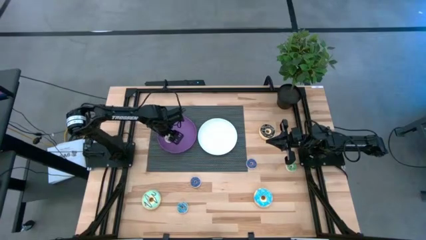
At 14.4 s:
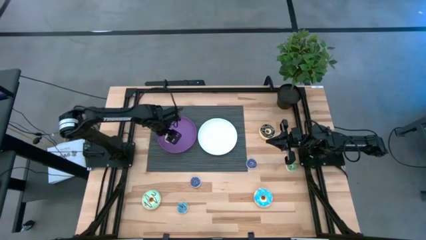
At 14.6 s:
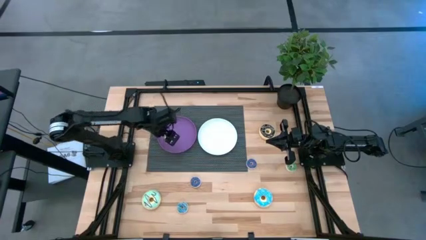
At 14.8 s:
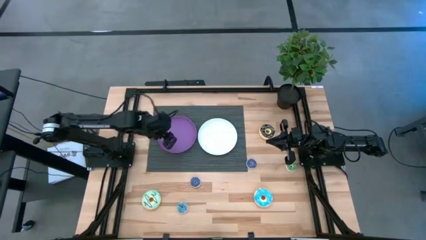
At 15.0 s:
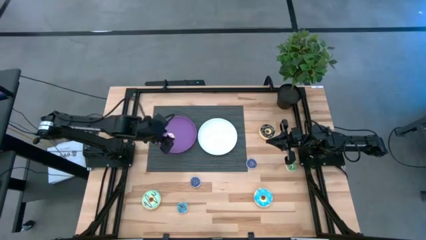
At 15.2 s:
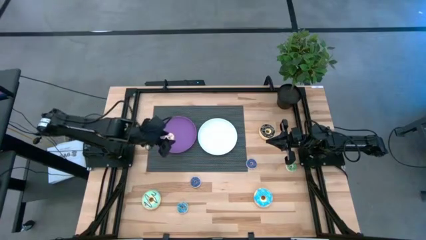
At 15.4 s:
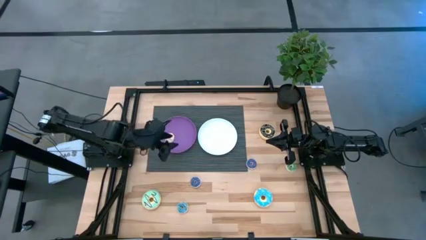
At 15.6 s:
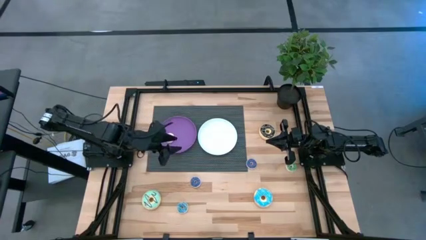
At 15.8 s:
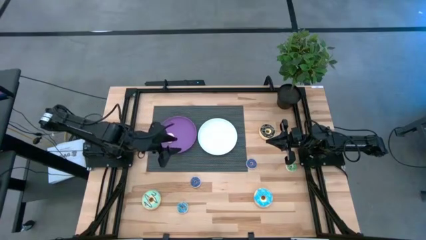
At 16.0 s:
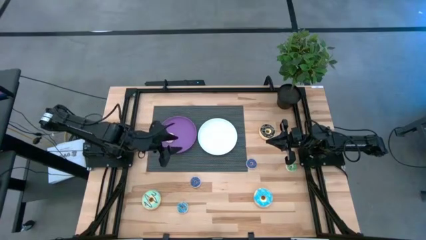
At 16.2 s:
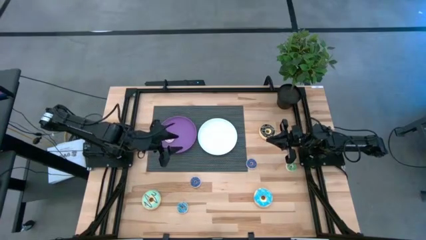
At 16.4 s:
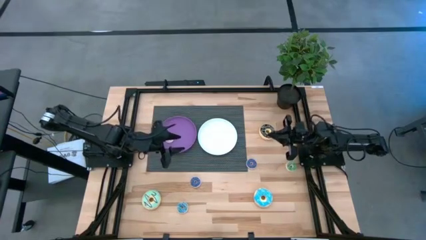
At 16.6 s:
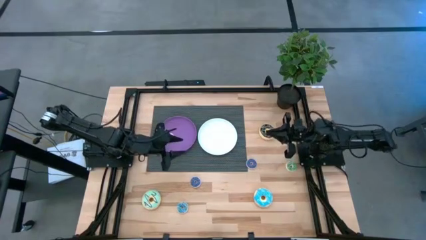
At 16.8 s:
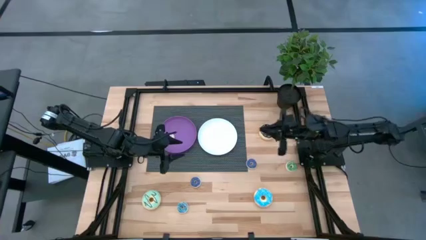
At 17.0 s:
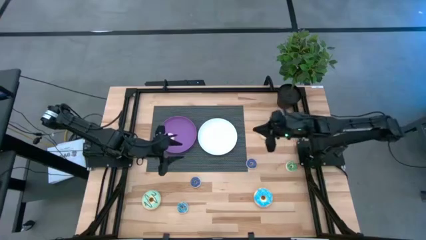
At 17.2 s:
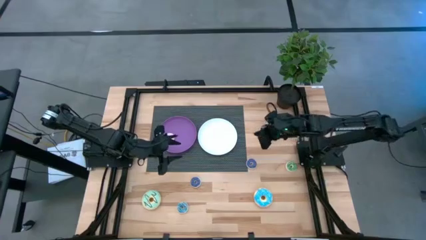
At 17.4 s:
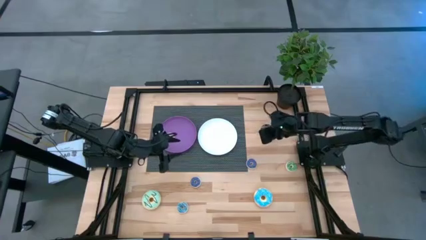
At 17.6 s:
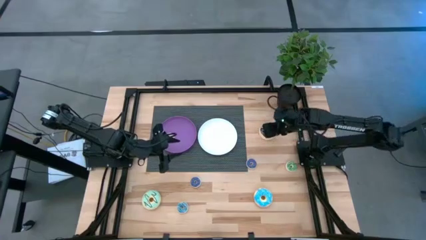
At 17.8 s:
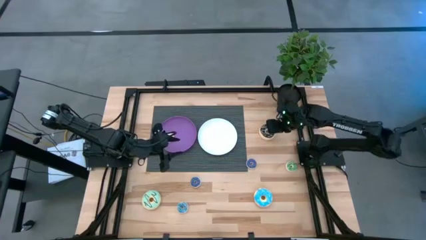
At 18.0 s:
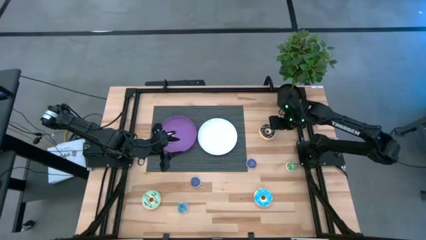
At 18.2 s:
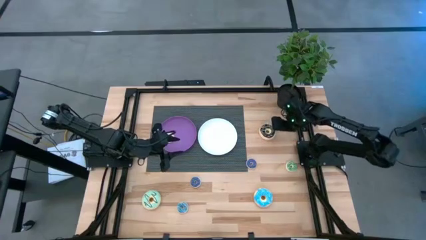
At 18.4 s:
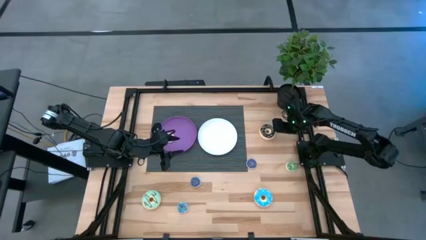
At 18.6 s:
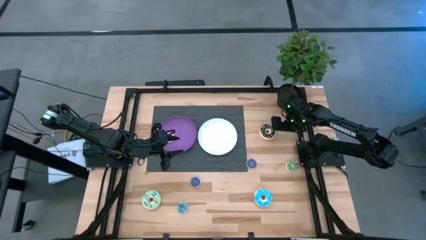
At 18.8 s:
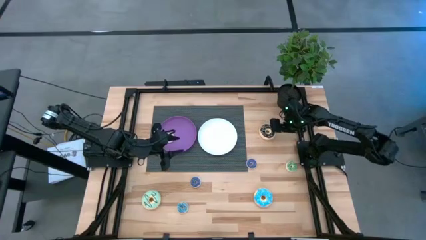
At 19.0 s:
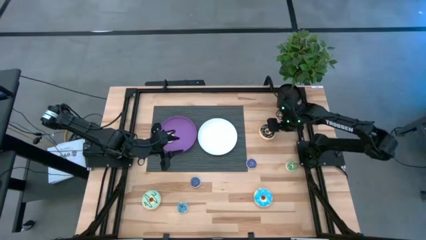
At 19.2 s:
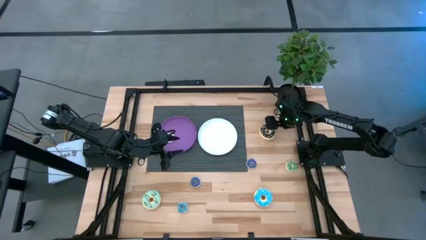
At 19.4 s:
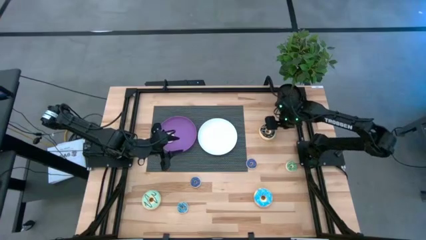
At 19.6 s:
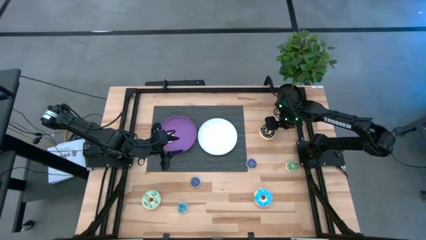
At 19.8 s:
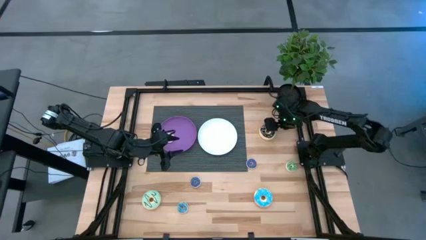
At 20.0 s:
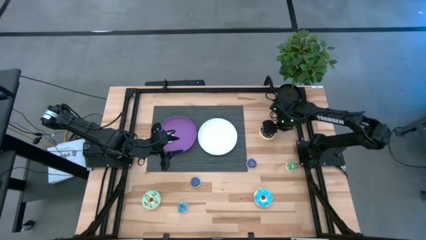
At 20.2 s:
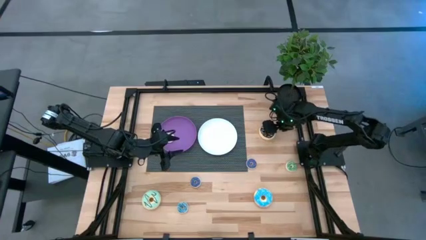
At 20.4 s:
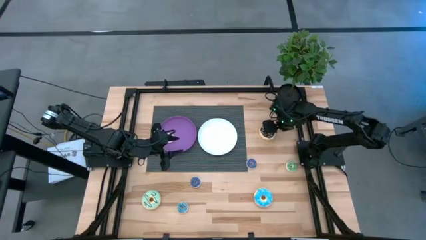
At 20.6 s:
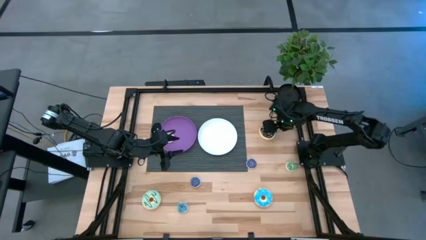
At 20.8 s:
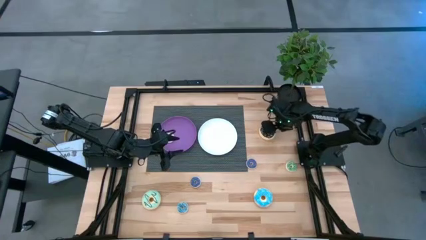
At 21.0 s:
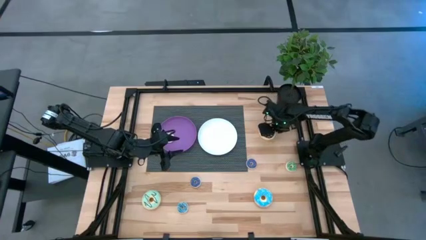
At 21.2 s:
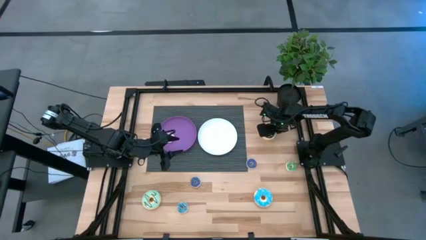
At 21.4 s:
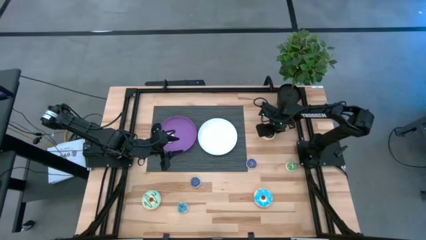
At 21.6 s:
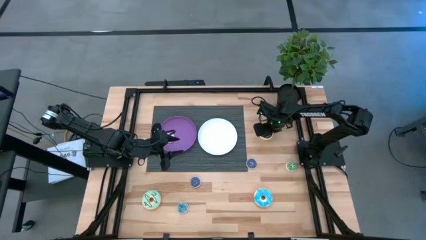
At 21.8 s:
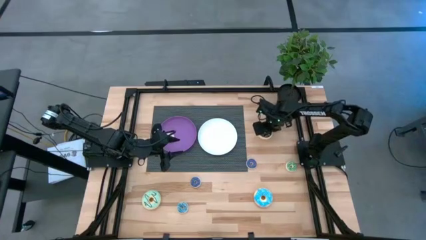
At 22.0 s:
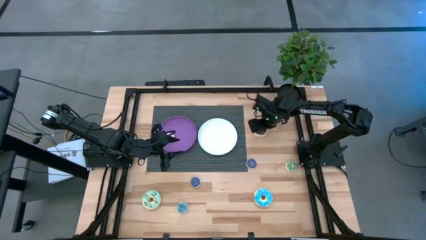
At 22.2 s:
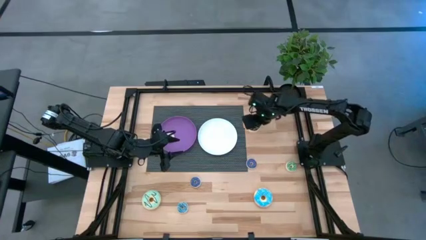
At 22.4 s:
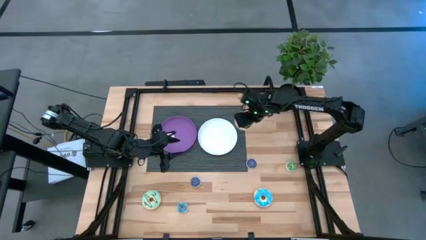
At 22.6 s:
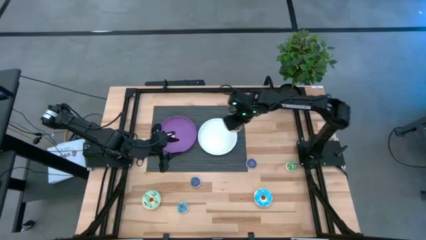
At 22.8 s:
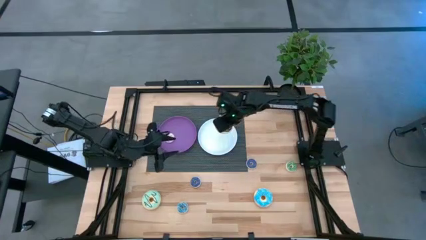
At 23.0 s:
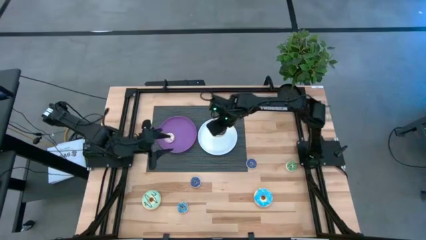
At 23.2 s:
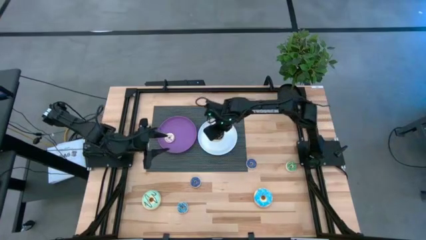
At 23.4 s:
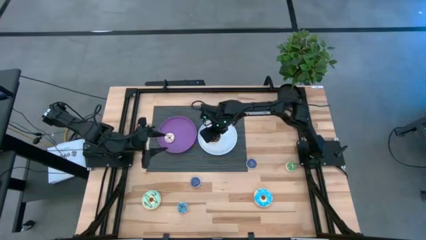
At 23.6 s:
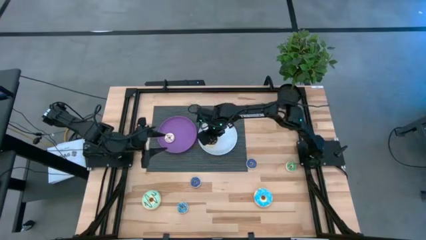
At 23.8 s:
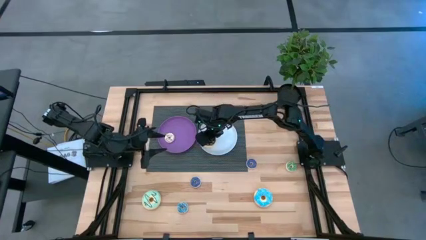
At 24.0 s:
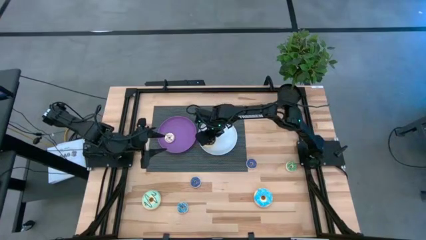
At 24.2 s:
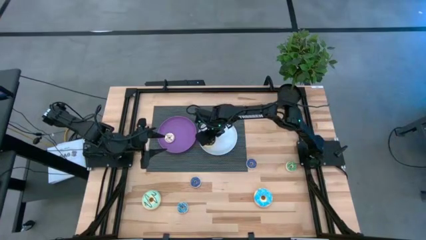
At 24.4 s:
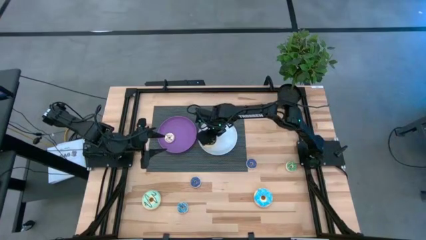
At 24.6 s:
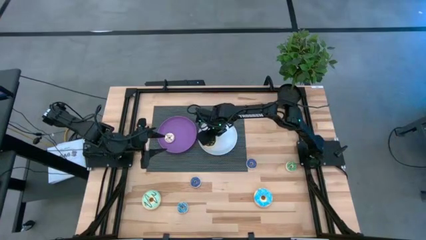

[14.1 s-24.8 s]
Task: Pick & Place donuts
Put the large brown donut on the white plate
